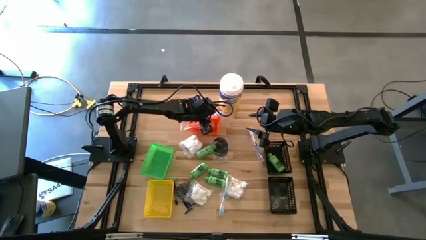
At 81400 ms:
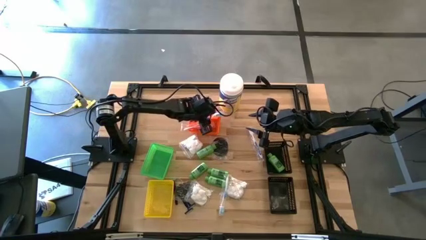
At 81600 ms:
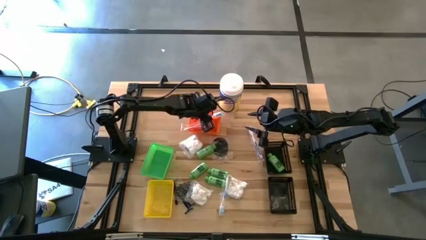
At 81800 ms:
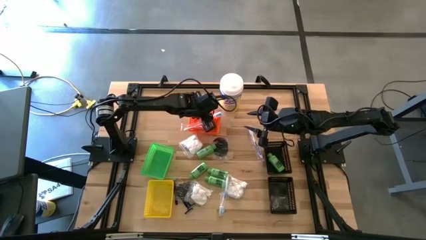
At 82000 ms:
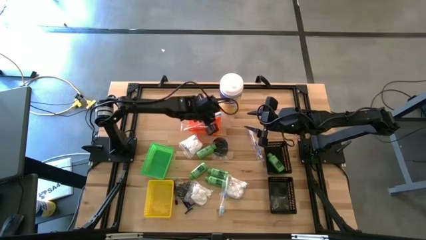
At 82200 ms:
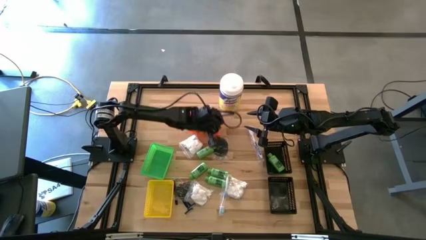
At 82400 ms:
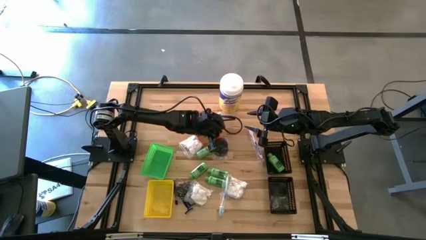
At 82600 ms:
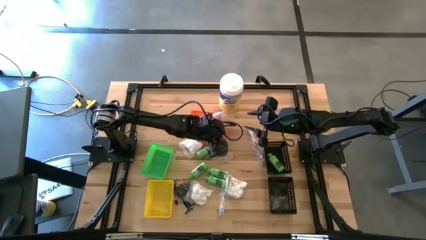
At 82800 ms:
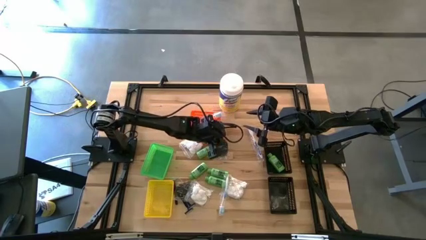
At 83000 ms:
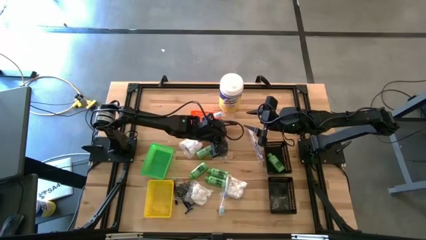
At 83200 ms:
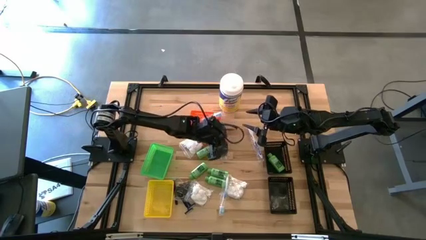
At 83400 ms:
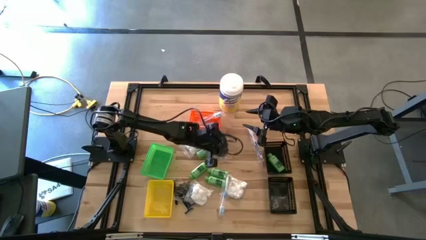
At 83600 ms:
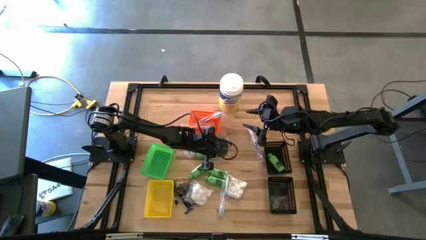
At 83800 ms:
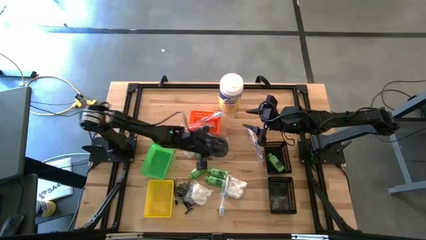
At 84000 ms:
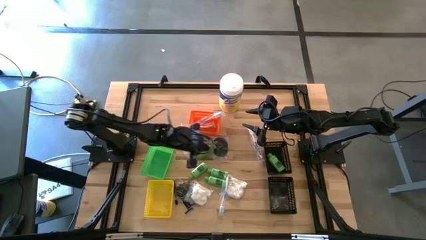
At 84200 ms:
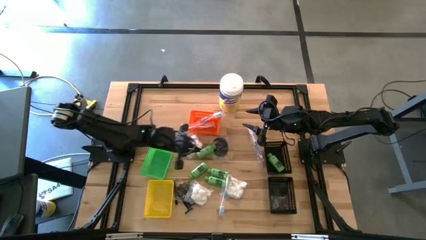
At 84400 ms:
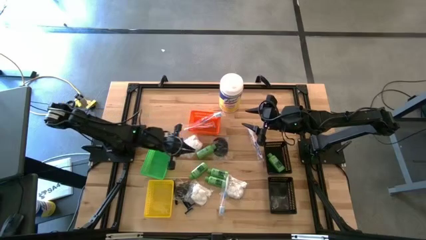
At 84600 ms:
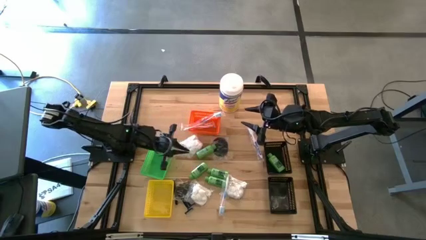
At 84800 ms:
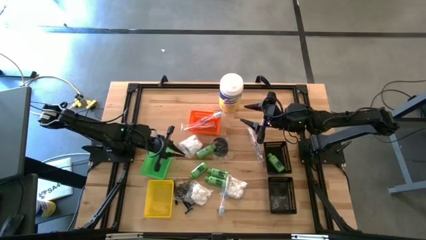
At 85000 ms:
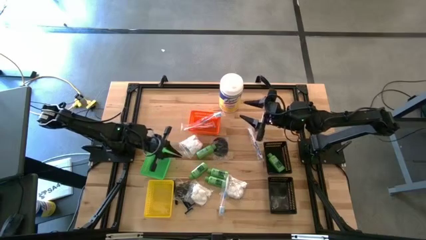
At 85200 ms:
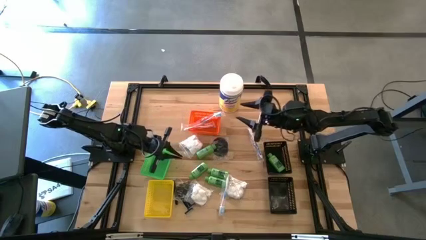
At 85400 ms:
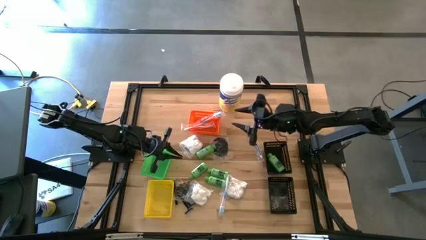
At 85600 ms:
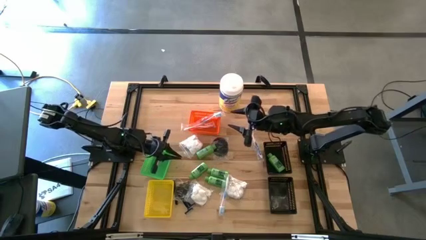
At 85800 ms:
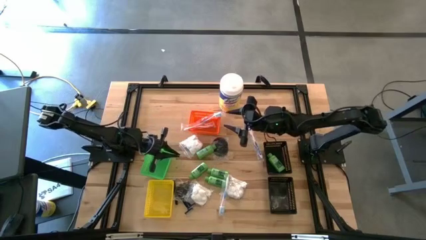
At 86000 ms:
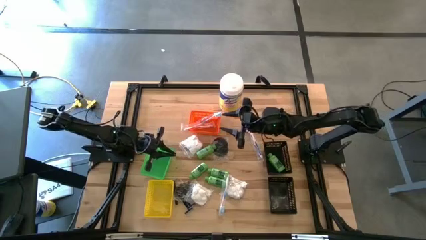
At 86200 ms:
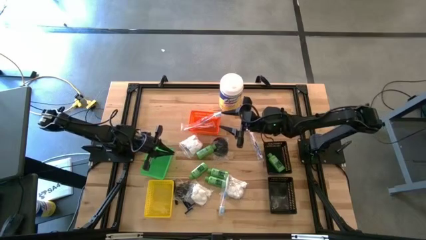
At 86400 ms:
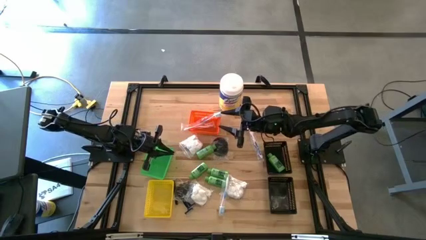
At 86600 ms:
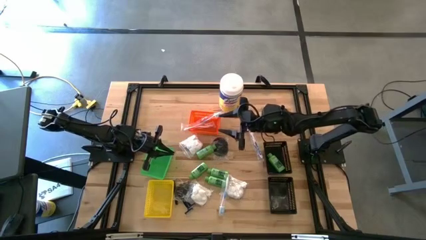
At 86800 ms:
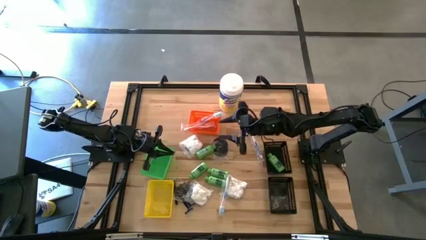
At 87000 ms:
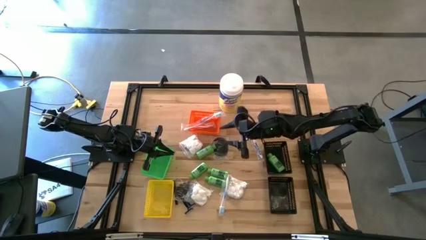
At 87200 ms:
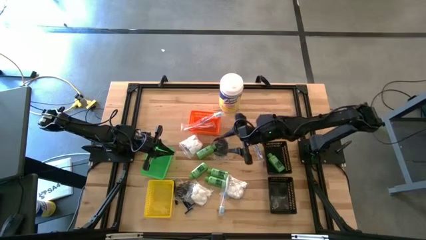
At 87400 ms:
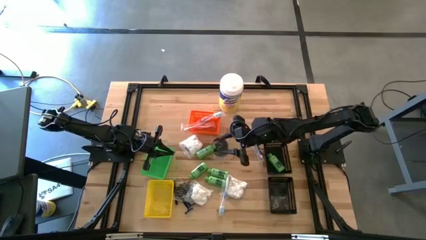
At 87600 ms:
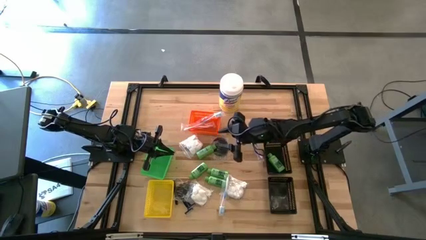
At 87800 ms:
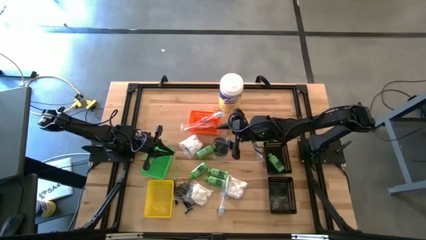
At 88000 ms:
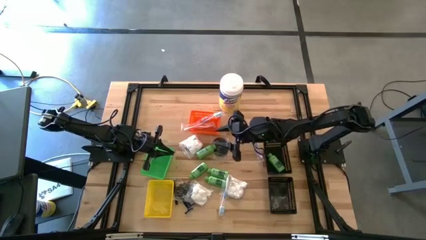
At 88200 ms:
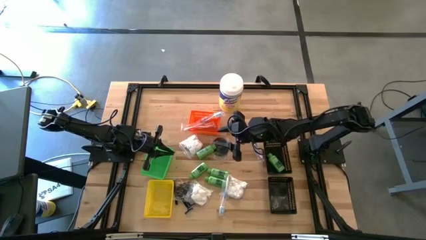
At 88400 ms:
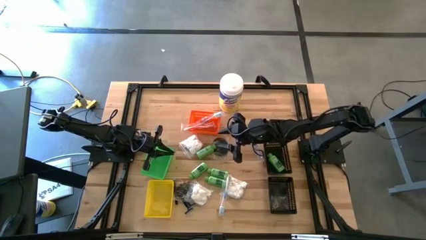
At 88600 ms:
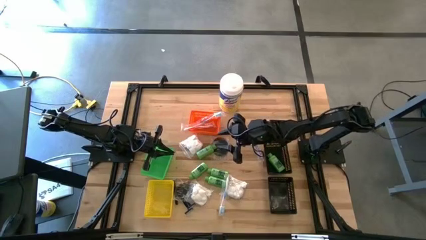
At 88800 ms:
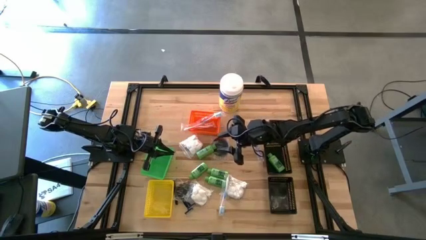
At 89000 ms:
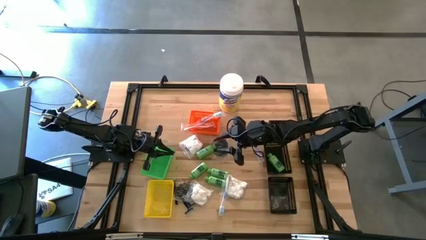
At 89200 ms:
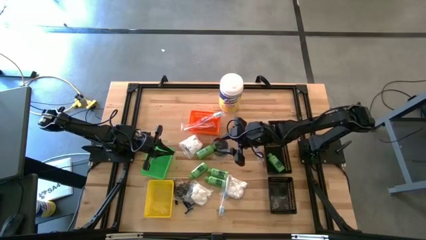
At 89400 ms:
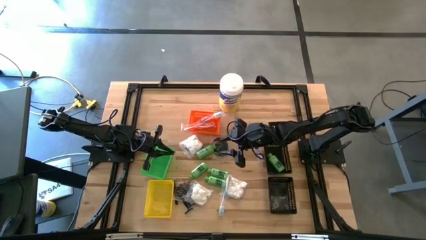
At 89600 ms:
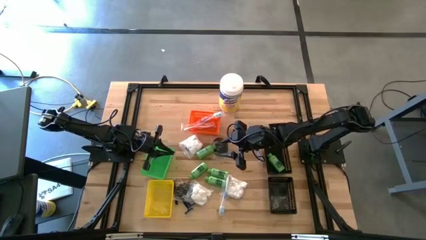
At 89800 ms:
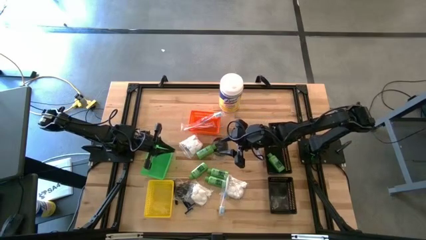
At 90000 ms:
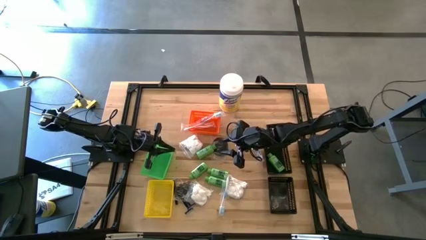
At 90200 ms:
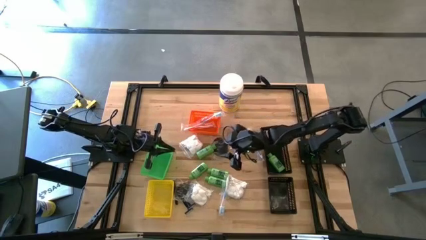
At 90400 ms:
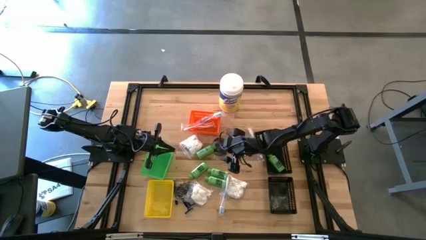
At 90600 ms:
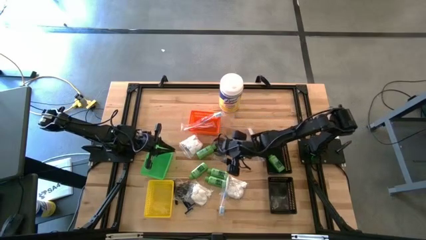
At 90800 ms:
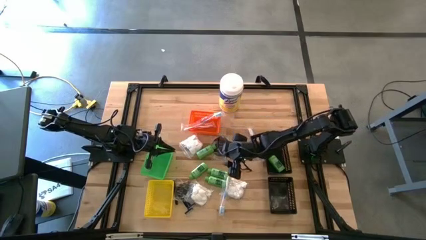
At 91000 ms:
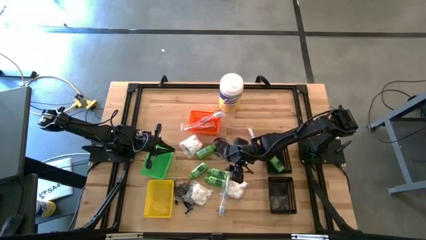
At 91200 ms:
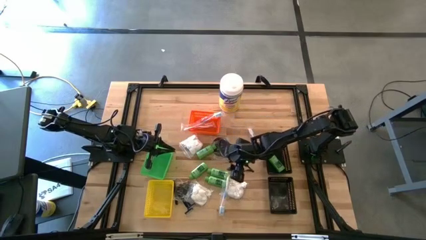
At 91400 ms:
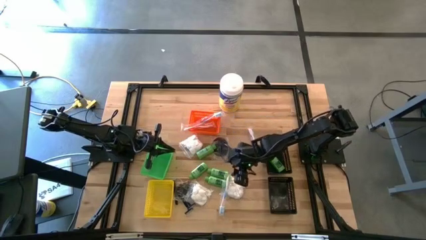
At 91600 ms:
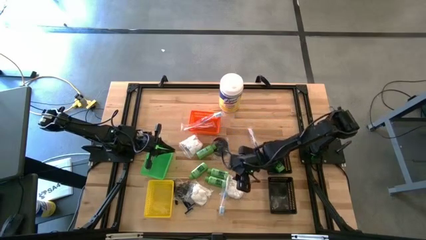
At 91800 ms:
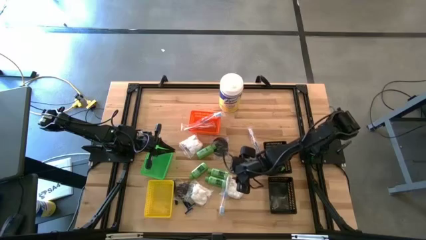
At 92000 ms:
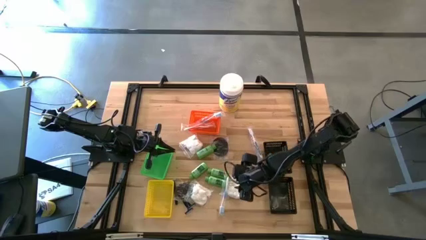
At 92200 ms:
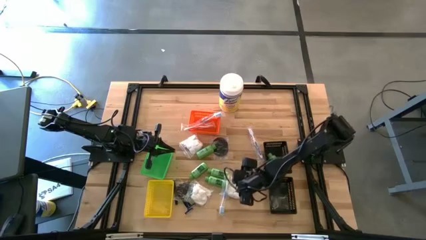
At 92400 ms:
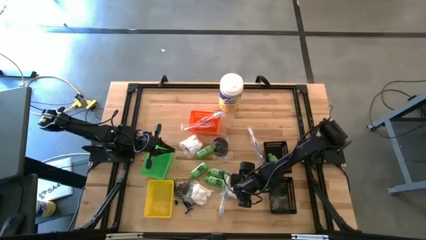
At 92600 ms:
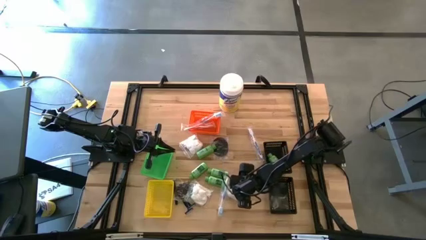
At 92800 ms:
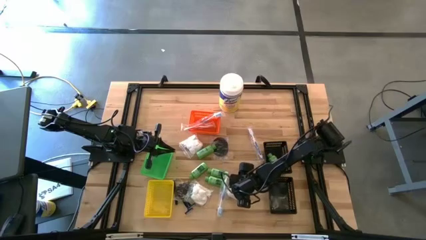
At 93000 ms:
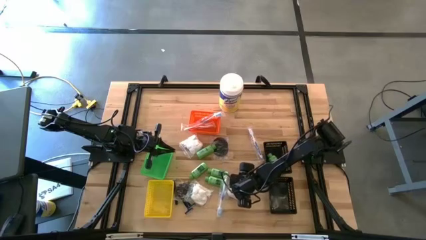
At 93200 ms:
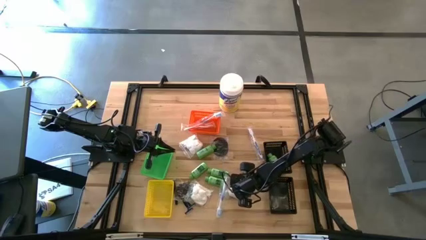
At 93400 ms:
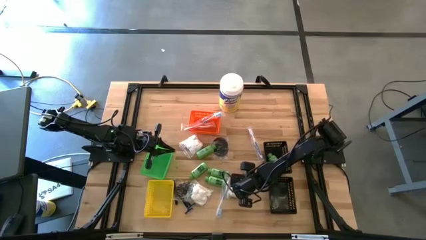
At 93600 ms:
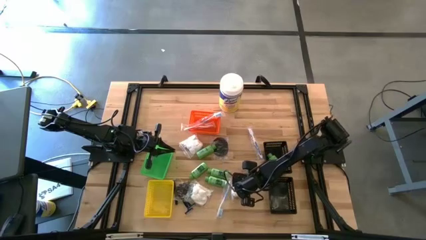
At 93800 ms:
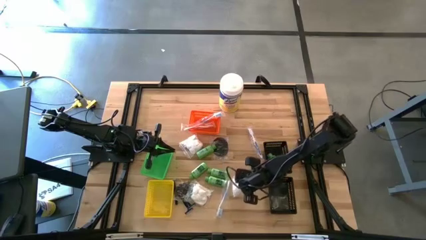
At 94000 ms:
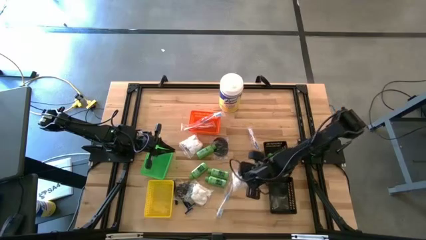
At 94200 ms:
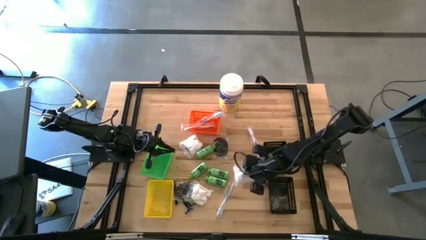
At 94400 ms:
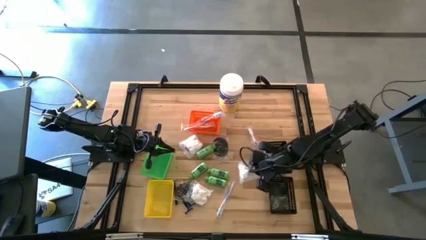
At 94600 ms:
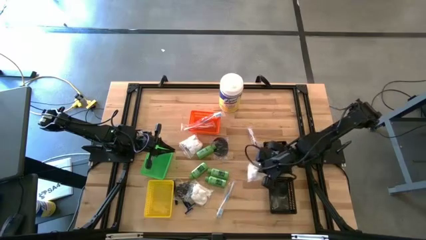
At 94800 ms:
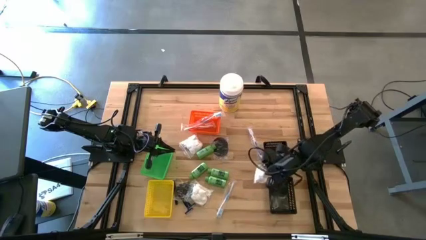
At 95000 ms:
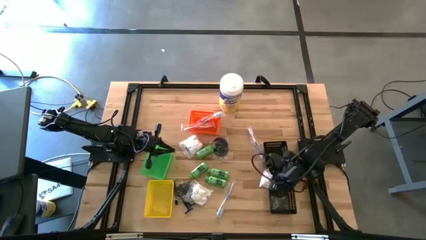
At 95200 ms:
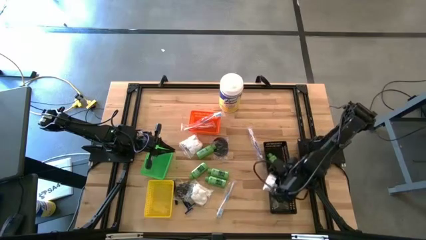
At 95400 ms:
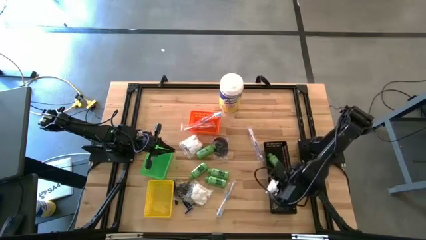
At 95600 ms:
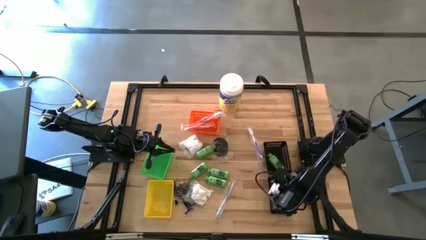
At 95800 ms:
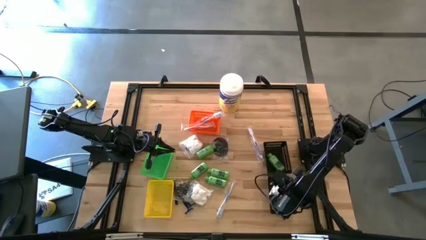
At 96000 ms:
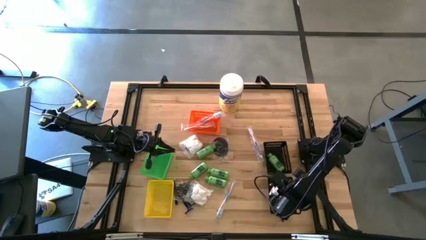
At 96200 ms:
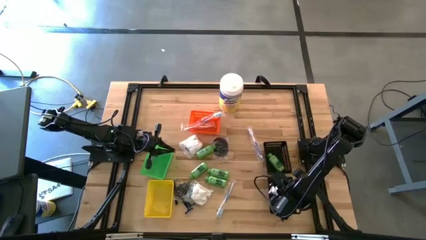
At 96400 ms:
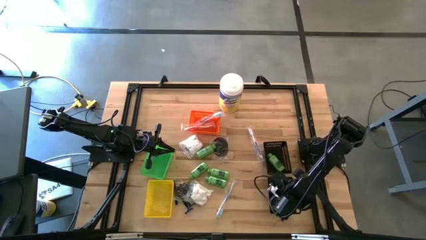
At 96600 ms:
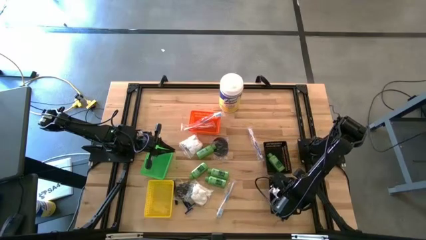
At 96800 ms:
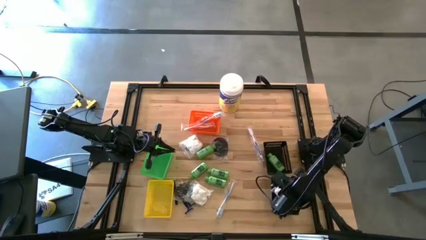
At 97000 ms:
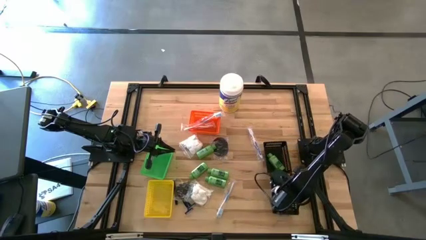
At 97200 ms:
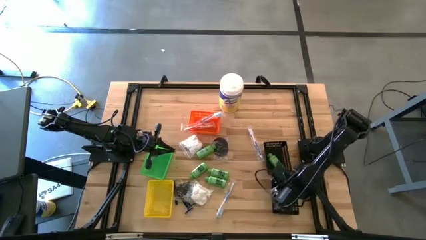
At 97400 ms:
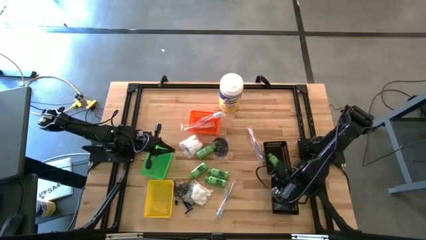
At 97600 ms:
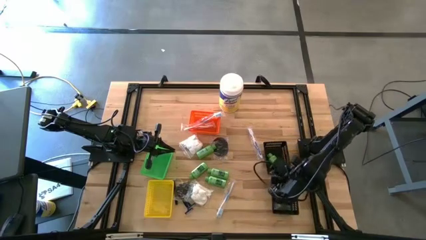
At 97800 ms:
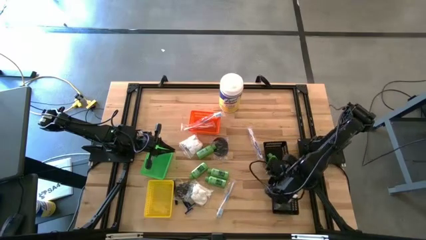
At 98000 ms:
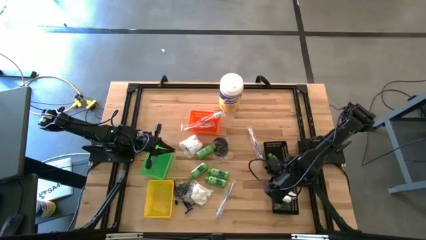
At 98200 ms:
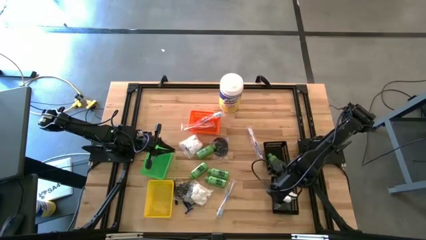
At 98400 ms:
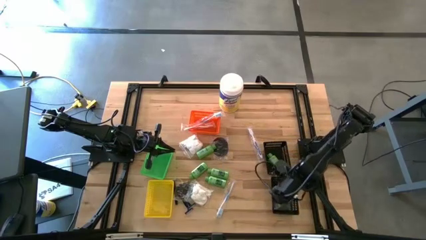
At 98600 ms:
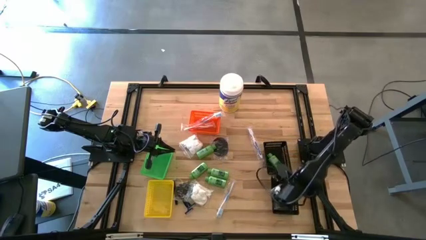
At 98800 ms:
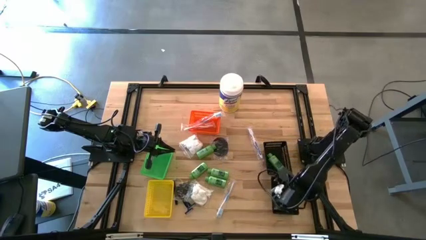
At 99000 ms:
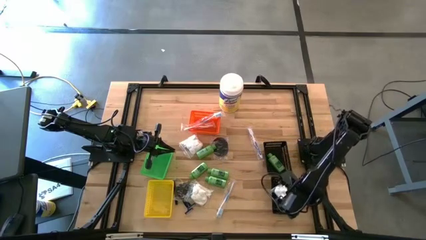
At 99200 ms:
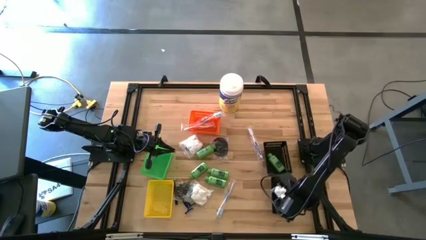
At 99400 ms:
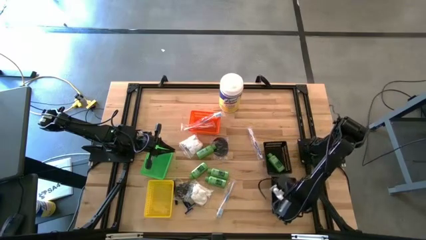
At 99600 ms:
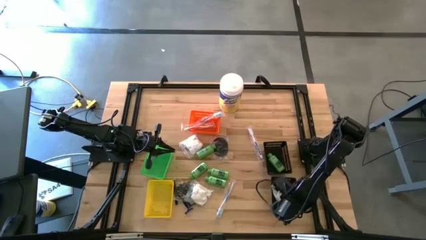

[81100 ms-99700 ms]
Task: Pick & Place Travel size toiletries
Put the white cotton pack into the bottom black bin
